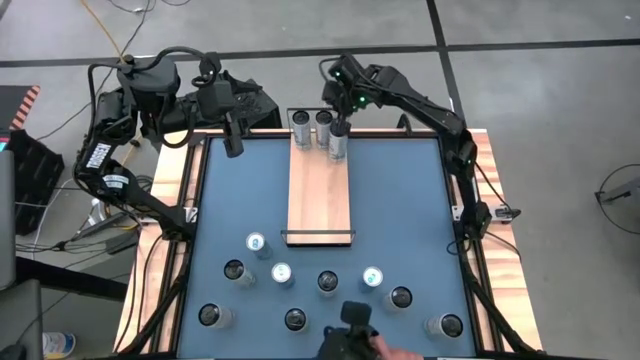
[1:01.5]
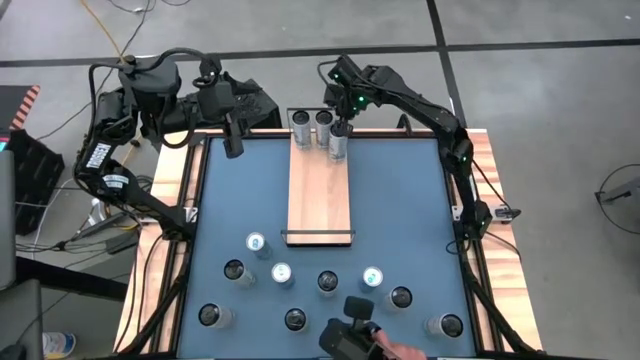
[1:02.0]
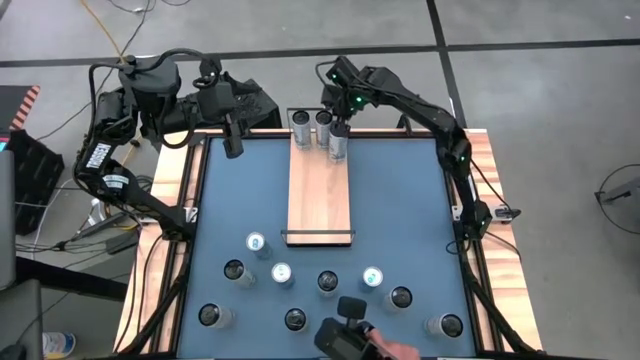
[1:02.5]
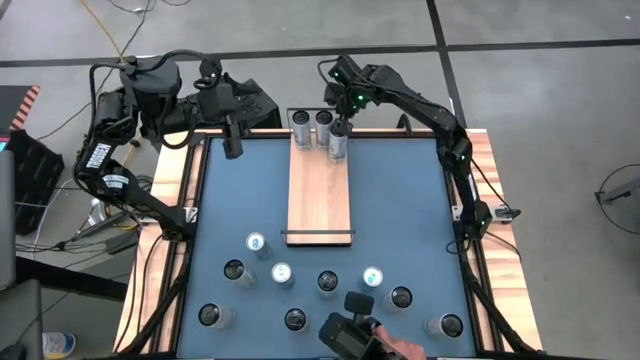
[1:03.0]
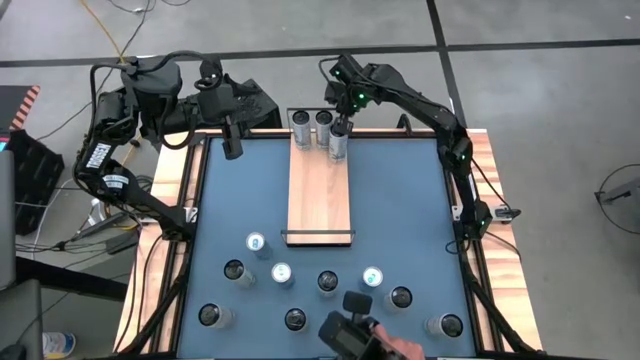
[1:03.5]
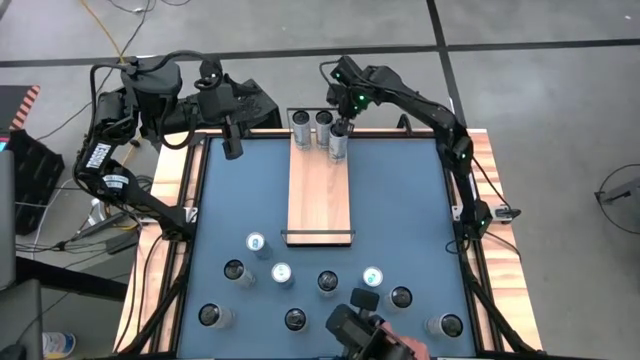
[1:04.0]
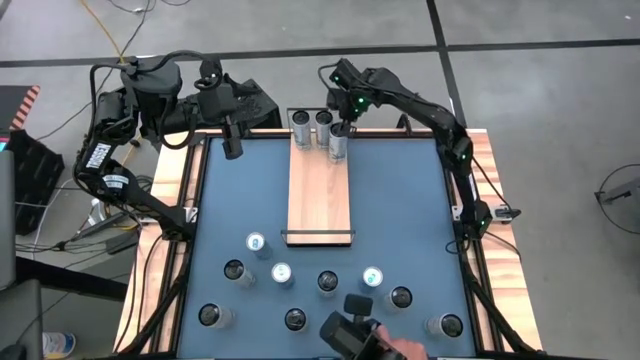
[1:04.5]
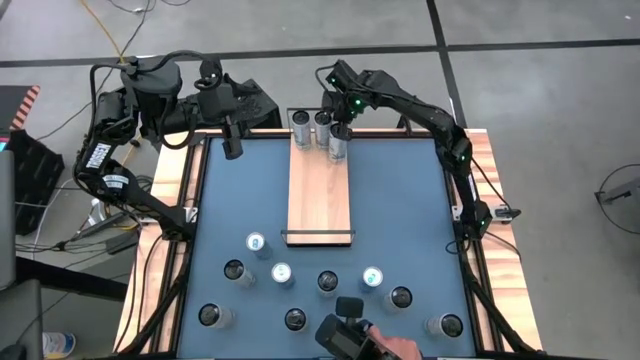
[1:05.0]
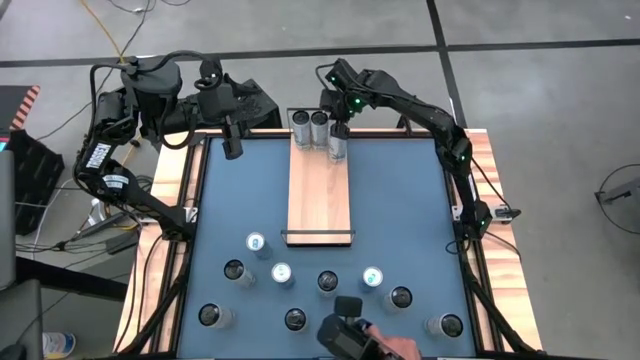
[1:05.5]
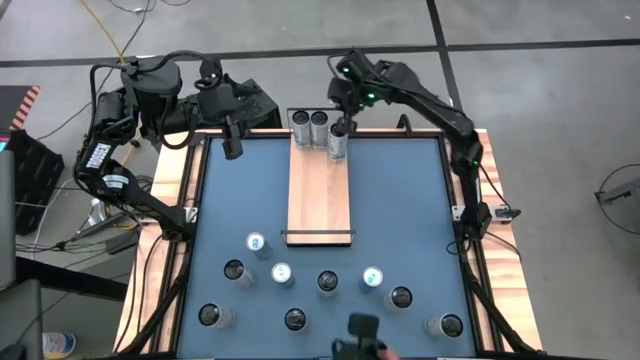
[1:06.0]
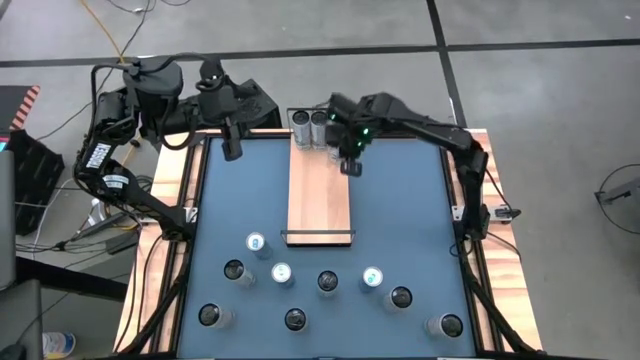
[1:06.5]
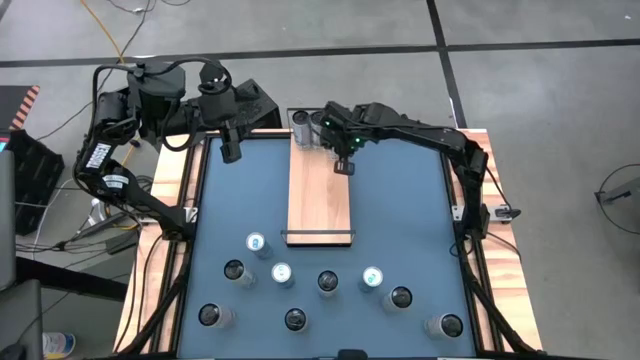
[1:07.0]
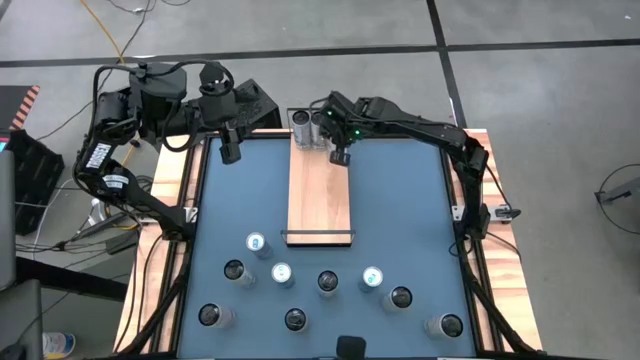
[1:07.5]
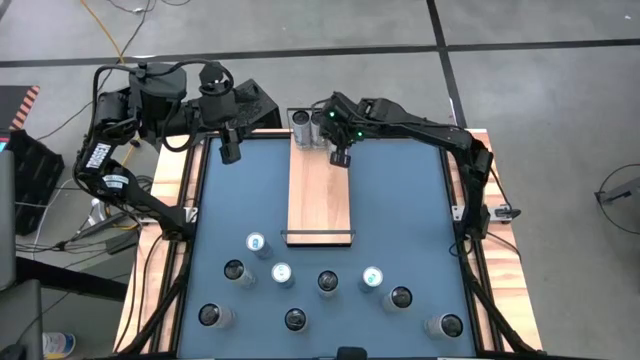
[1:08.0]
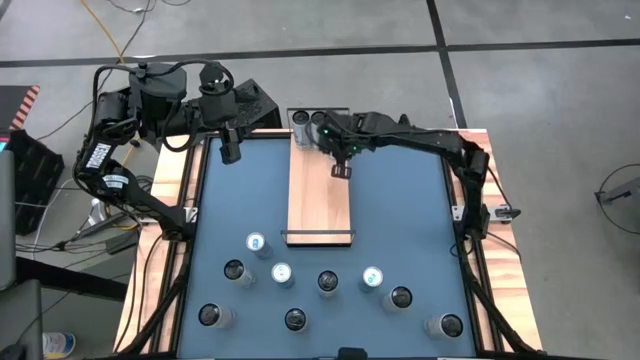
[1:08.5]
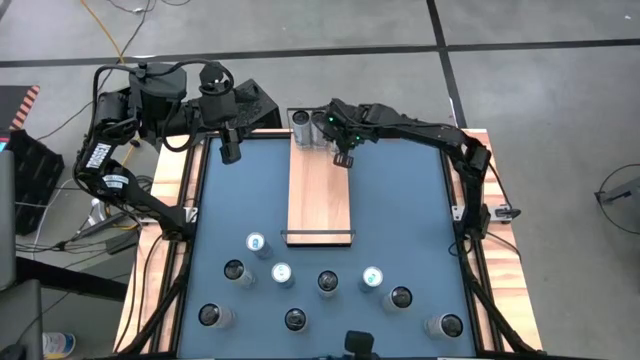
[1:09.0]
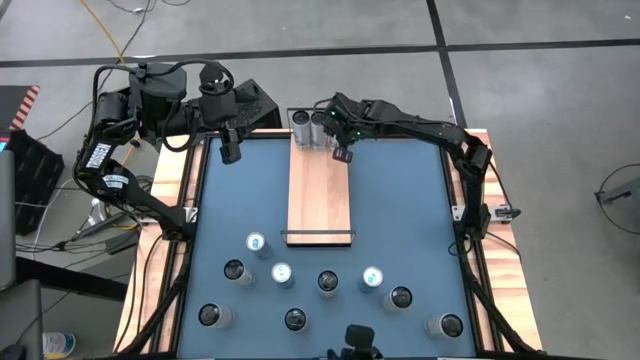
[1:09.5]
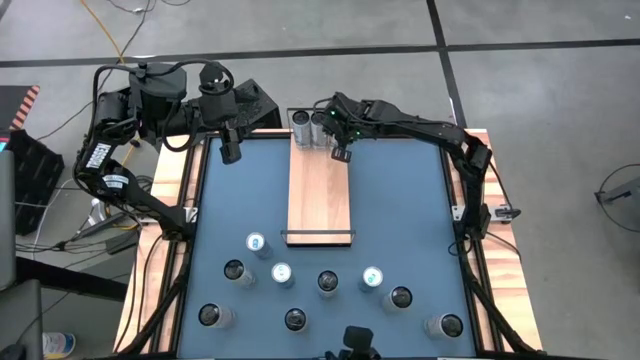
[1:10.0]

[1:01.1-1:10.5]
Task: Place canned beverage on shelf
Adjust the white-blue soda cans on the shelf

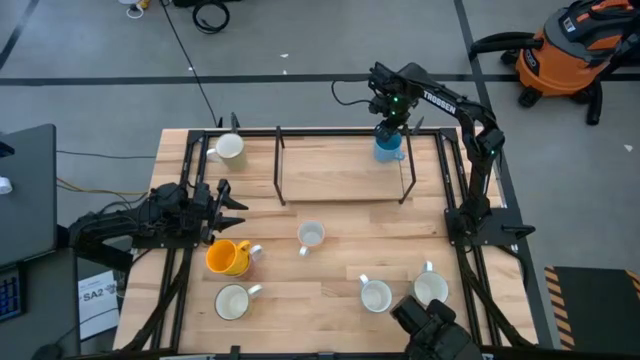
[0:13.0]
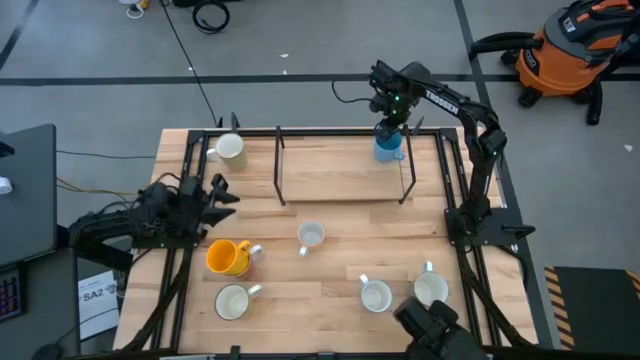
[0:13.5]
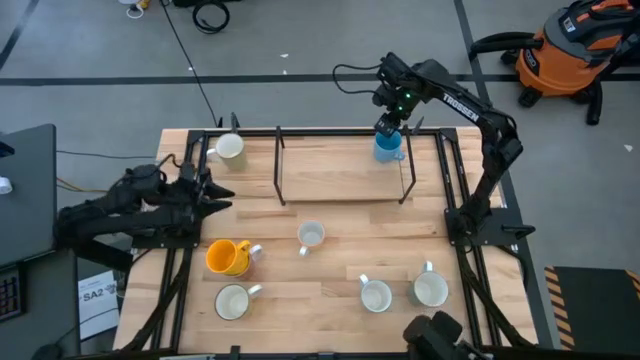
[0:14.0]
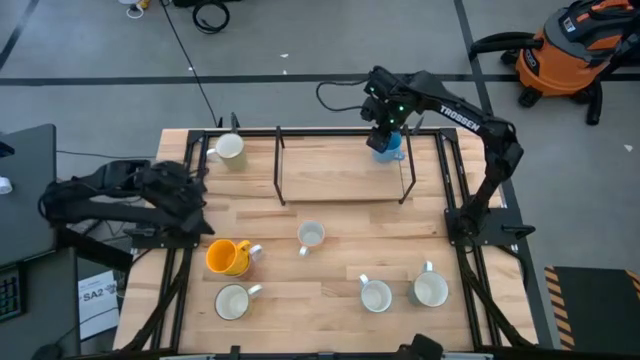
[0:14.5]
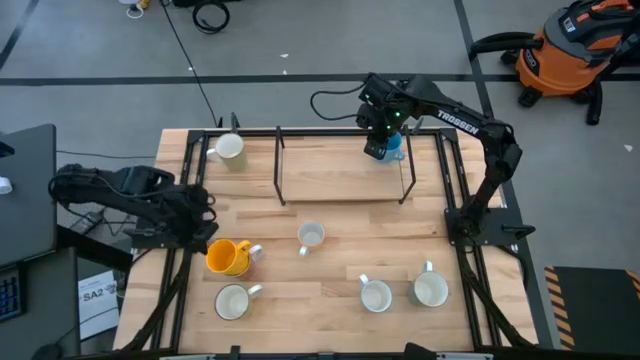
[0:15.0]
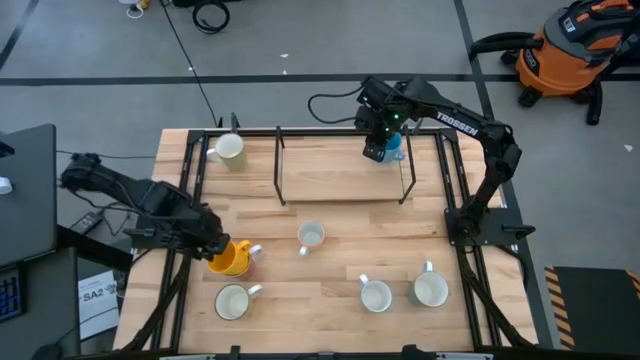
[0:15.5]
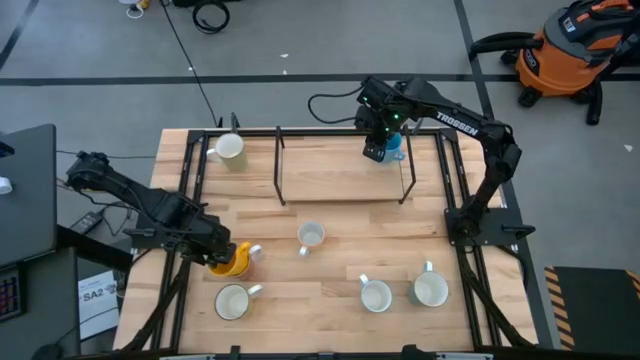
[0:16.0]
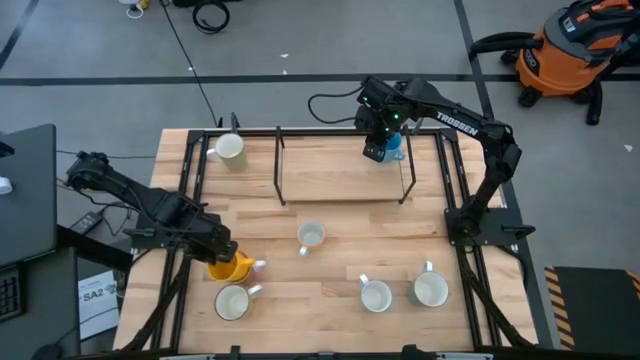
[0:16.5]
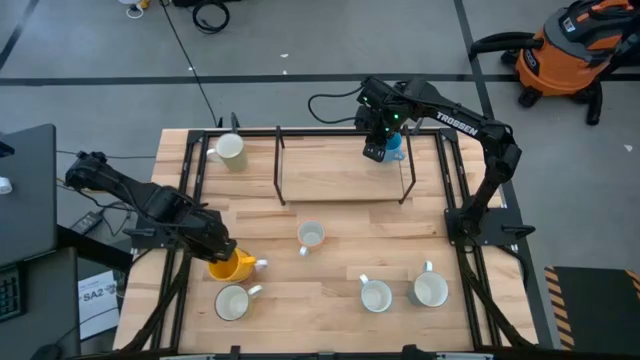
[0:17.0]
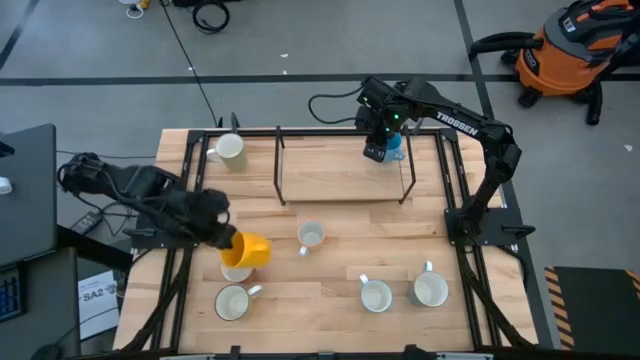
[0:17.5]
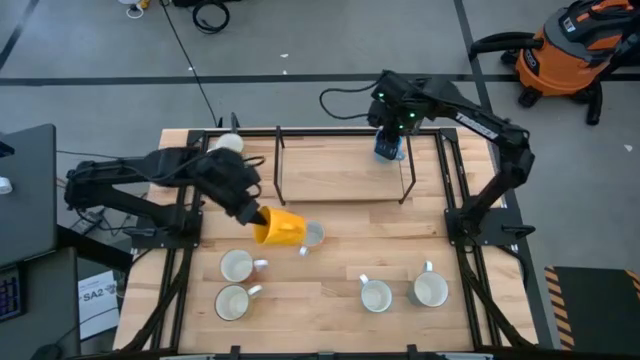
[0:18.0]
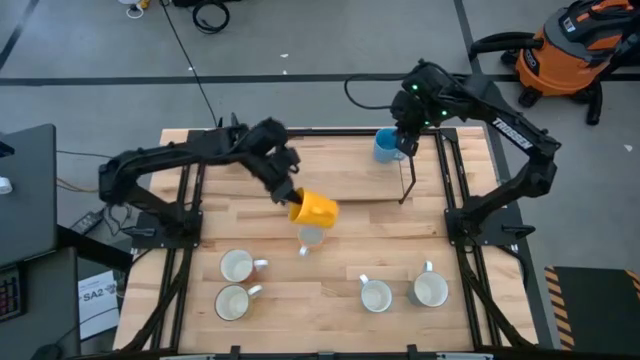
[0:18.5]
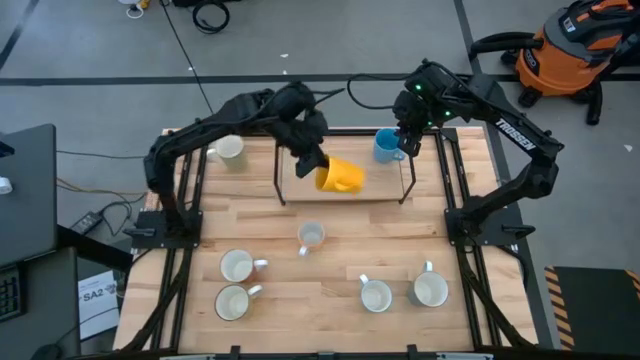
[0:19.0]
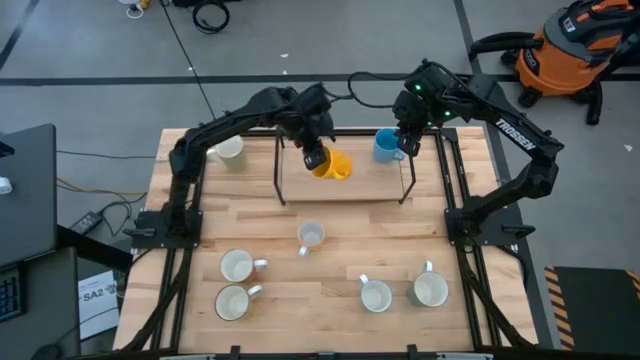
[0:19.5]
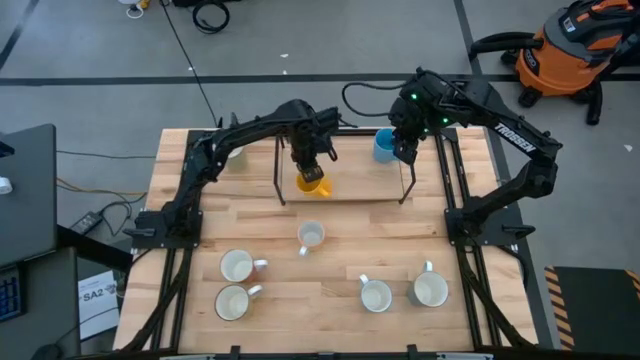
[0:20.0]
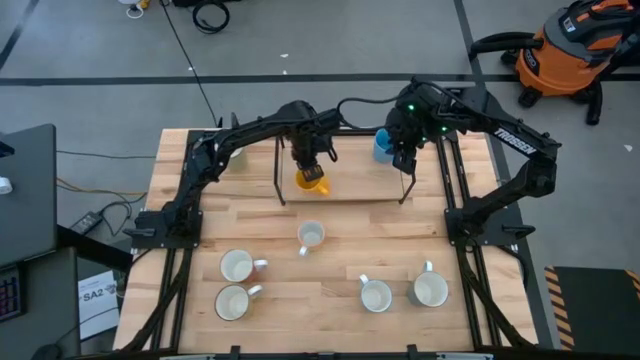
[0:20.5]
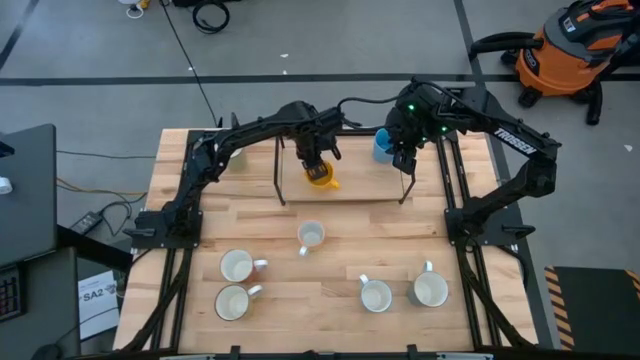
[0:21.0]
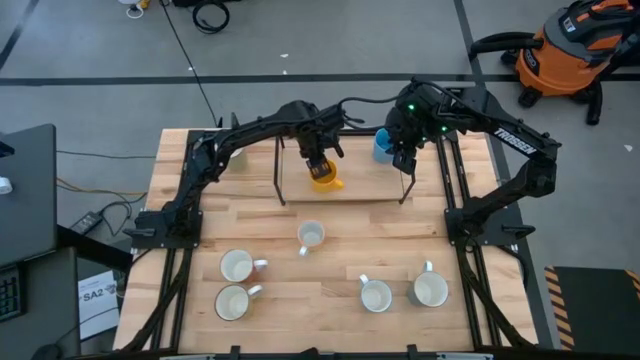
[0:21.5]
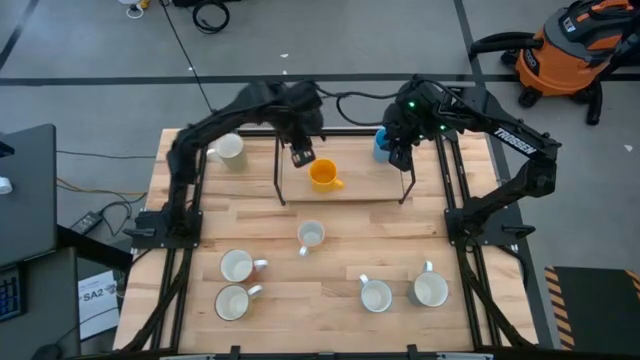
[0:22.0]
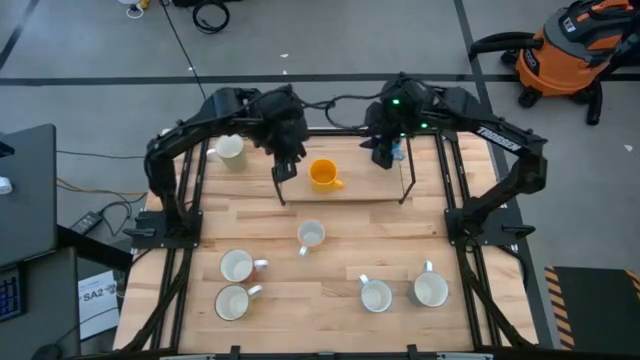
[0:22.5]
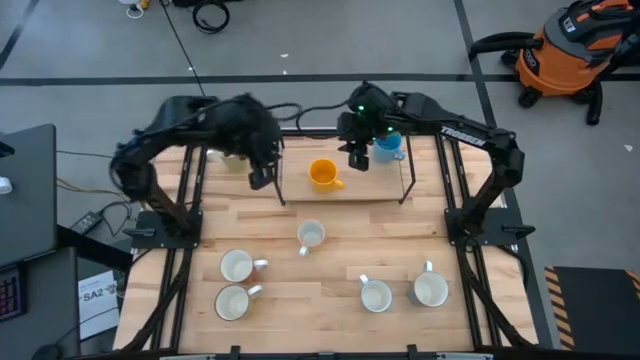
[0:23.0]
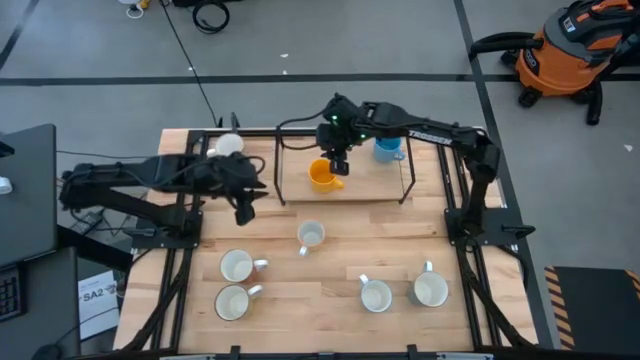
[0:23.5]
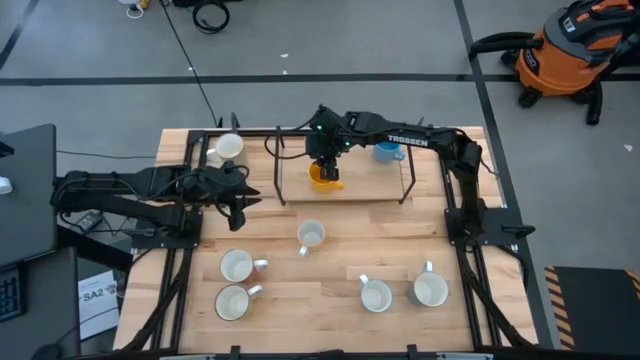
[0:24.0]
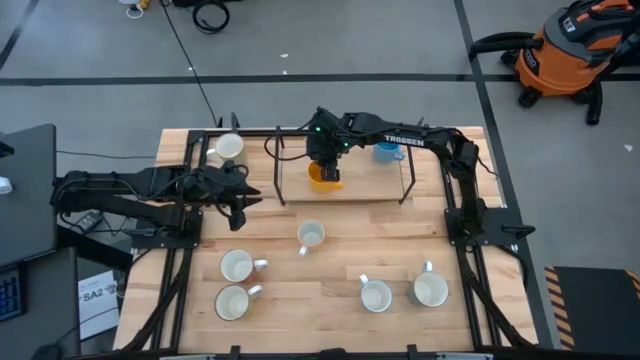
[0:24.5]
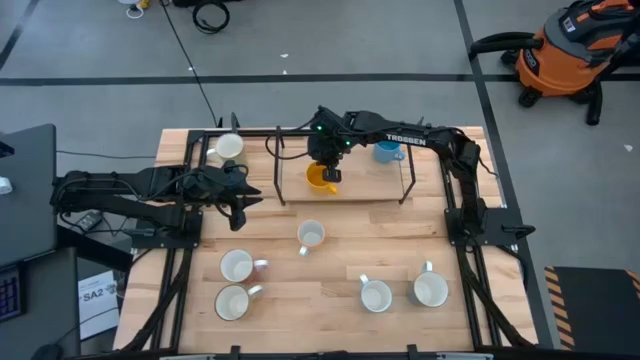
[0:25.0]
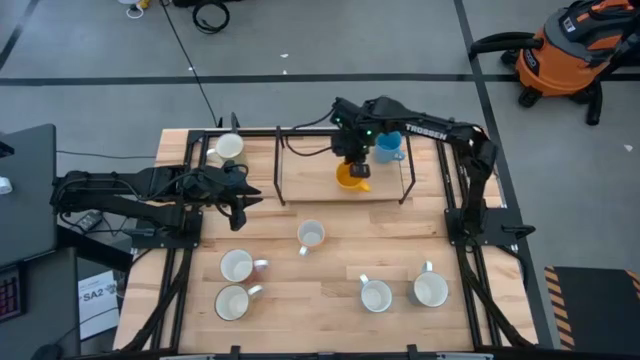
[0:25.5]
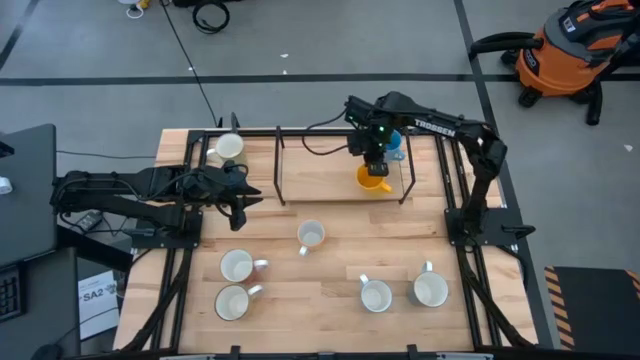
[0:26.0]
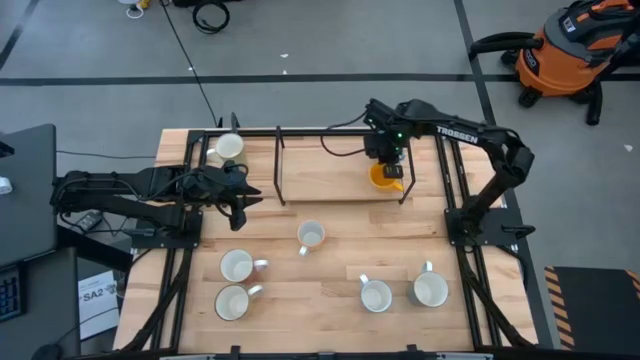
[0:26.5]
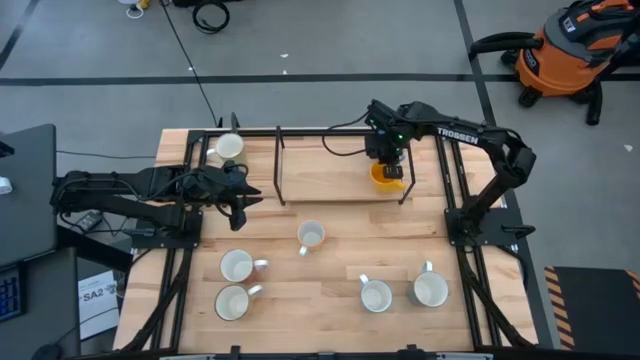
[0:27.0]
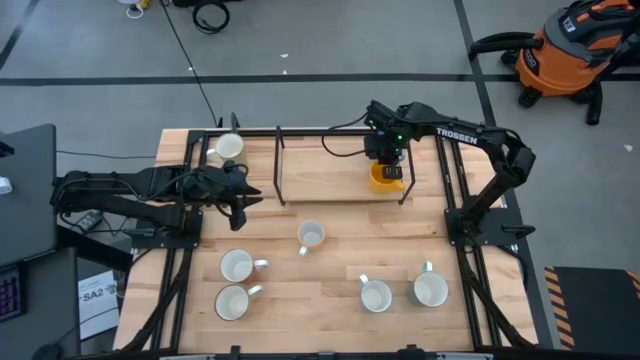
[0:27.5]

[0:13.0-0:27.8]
Task: Place coffee mugs
Put the yellow mug on the shelf
